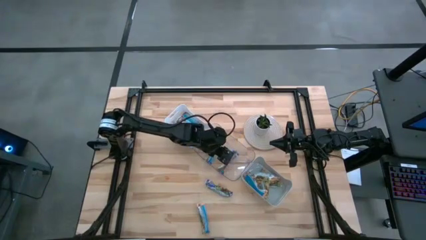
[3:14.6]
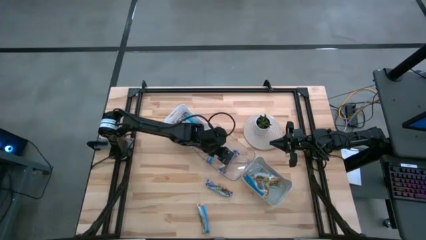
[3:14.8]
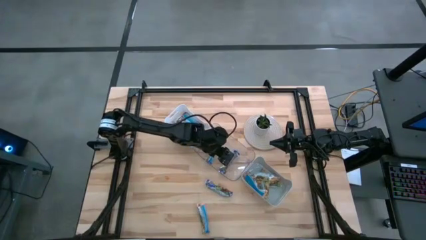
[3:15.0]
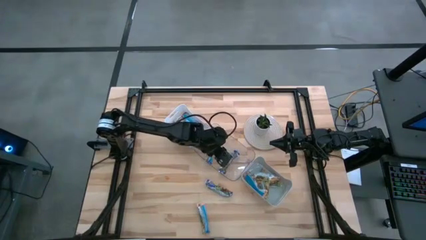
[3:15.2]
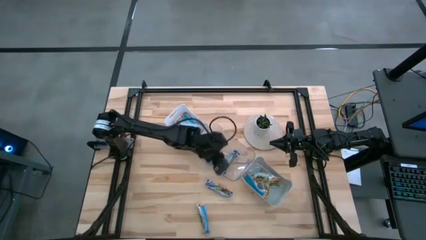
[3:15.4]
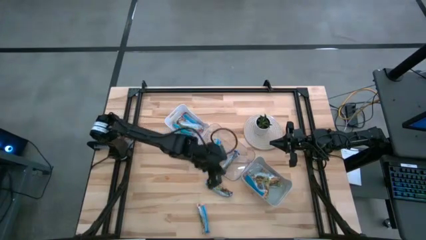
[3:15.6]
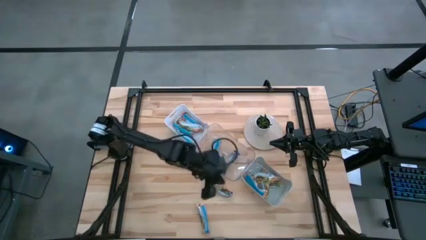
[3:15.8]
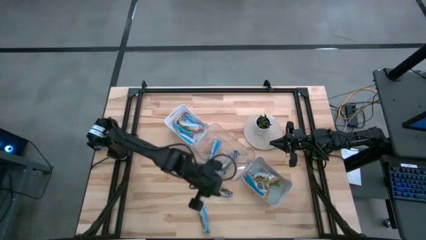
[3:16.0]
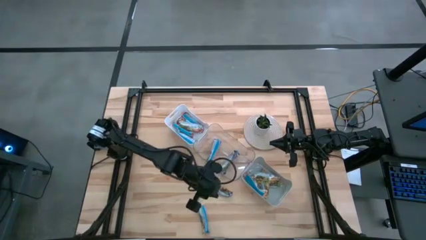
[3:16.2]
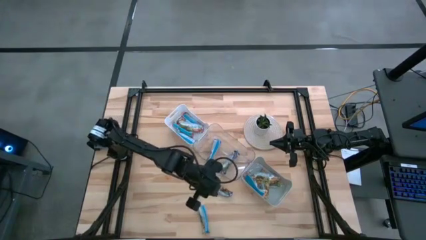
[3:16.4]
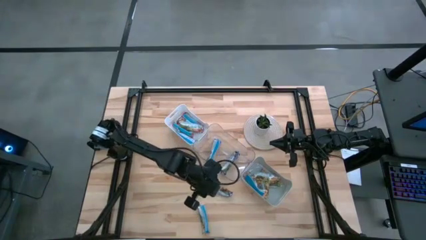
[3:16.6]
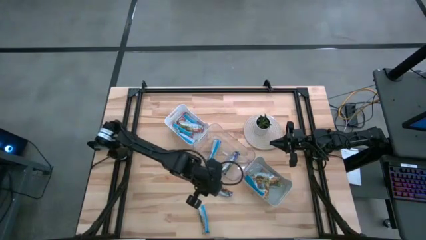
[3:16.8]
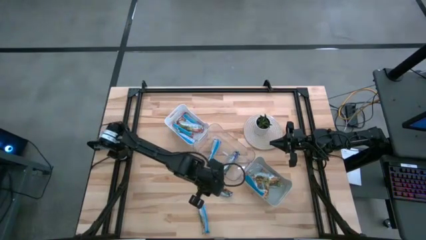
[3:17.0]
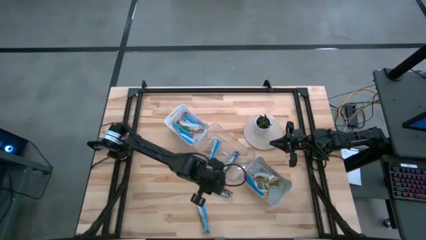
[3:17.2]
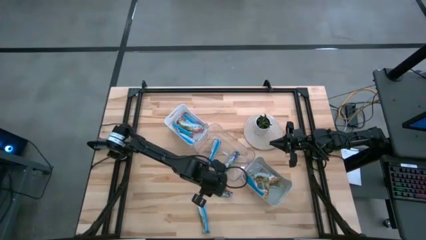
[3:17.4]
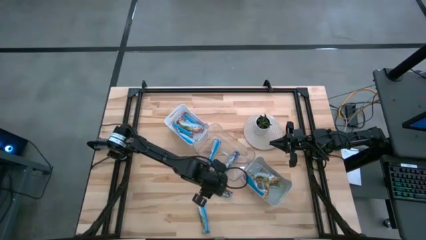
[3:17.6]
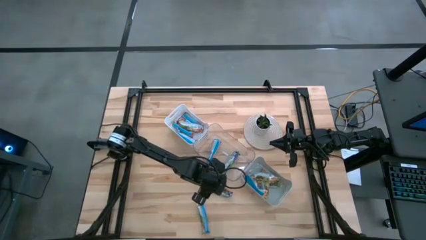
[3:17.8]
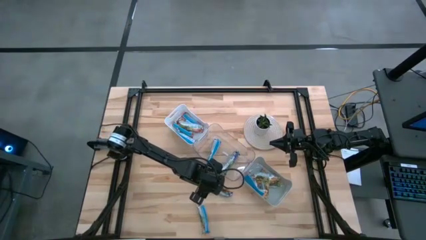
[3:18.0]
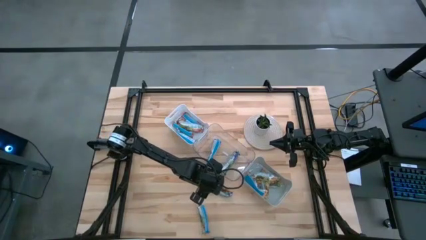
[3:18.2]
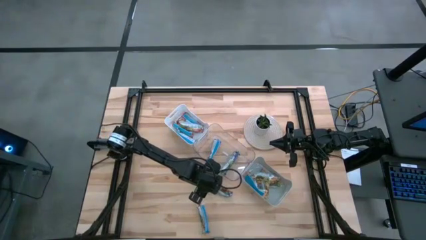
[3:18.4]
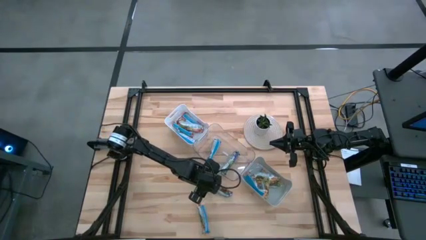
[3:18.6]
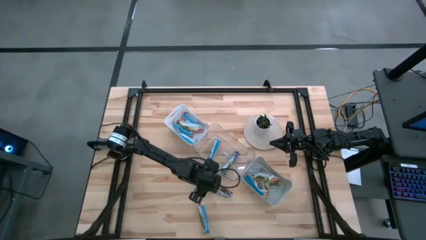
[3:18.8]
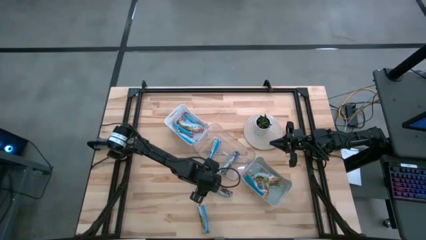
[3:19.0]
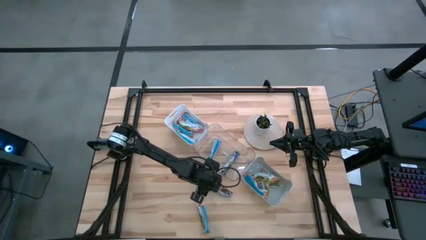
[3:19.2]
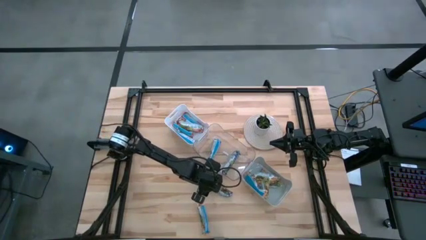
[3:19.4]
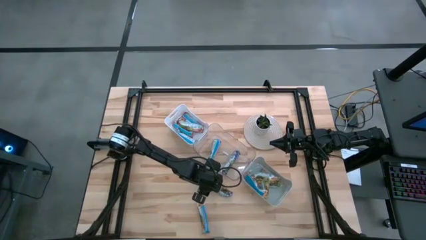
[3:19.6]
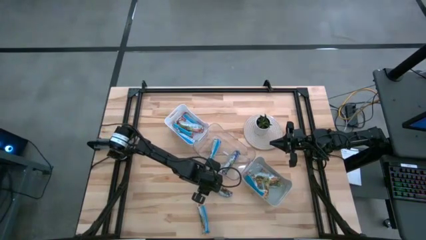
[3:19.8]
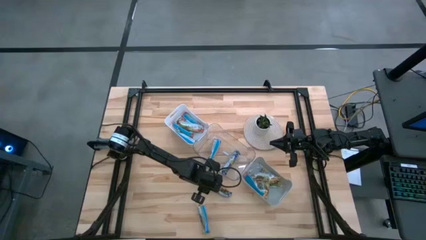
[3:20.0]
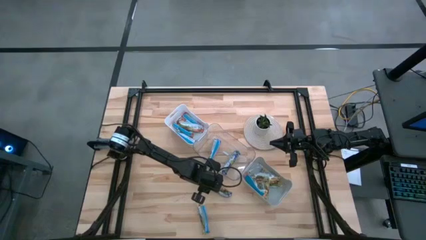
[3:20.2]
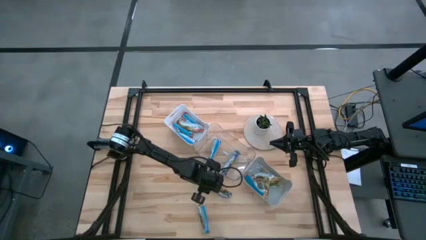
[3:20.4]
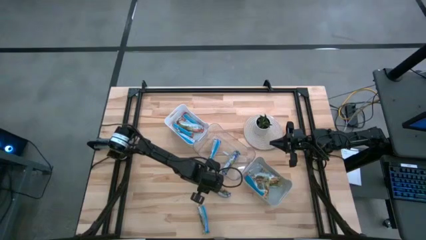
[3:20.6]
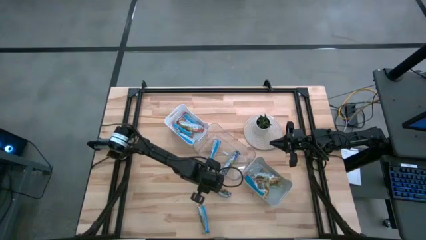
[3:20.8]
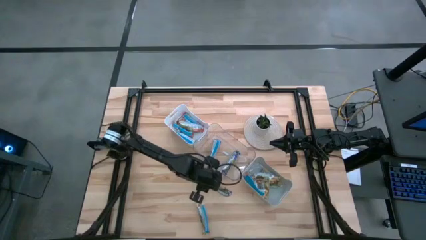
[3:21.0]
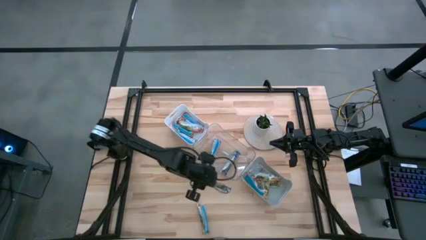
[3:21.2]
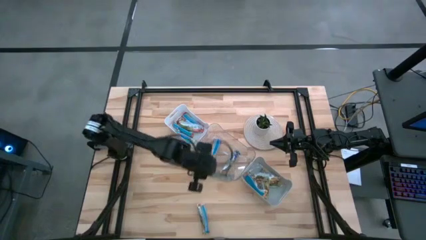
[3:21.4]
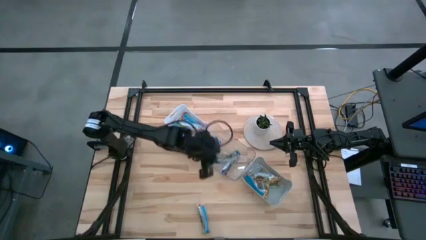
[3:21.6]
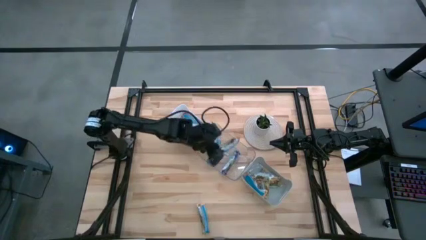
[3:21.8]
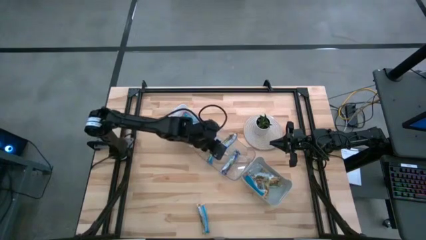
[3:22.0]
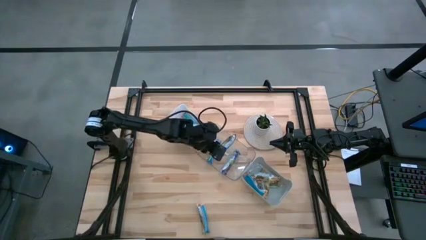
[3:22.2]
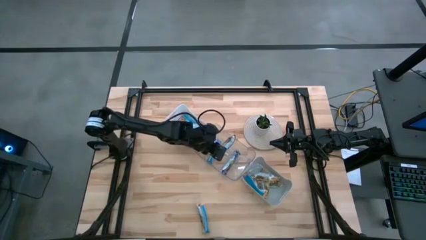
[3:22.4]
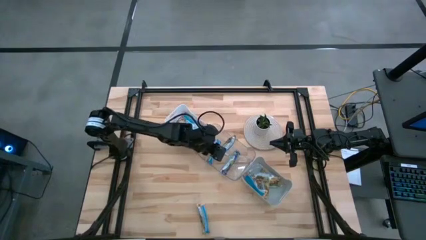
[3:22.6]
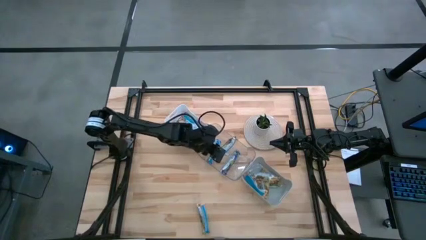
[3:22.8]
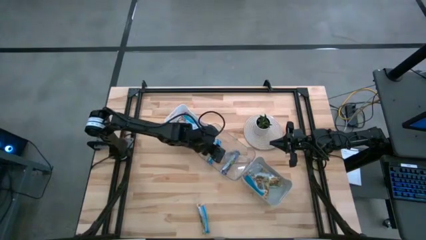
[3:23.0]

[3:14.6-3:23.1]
Task: Pick and place Granola Bars by type
Put the blue granola bar into the transparent bin

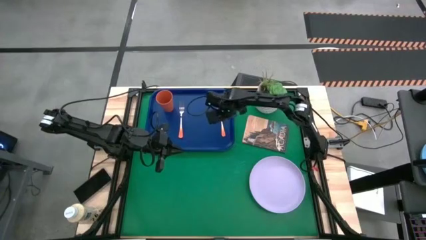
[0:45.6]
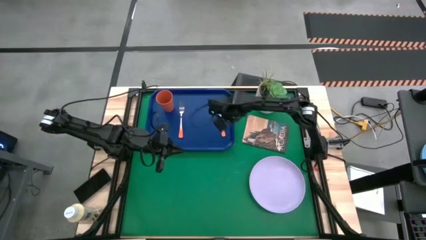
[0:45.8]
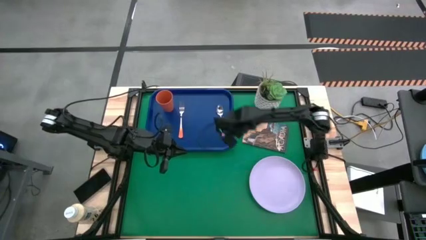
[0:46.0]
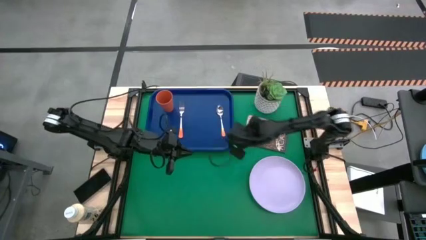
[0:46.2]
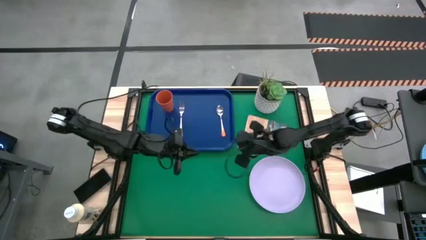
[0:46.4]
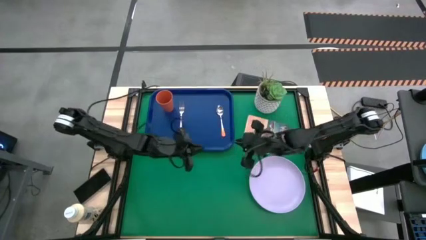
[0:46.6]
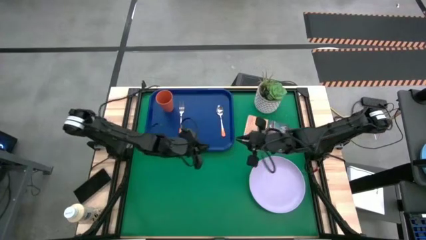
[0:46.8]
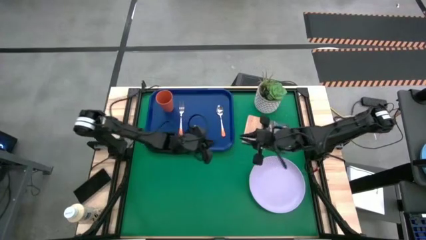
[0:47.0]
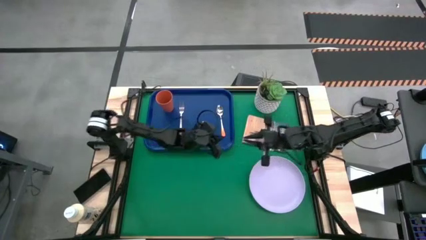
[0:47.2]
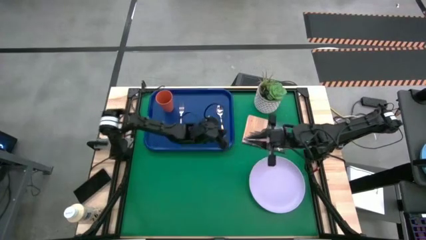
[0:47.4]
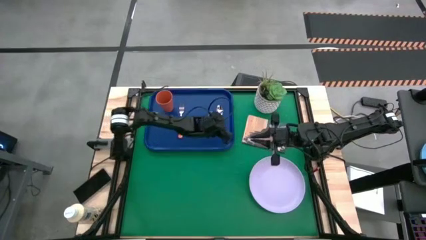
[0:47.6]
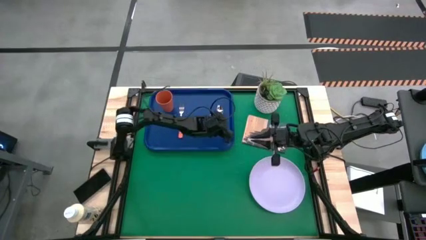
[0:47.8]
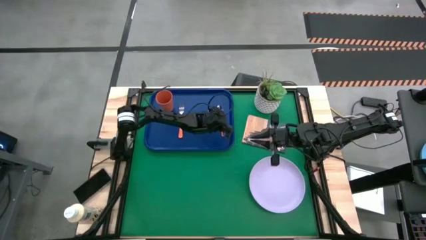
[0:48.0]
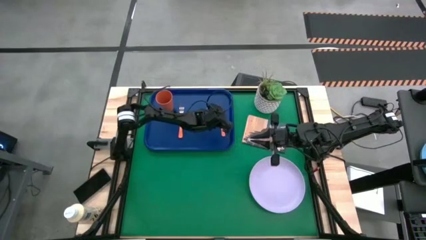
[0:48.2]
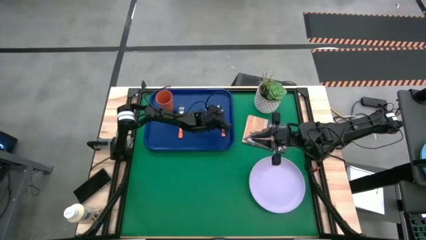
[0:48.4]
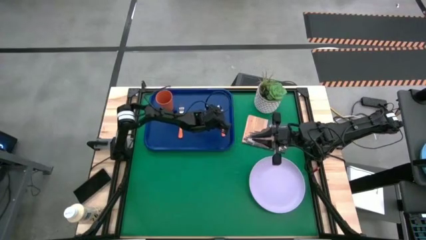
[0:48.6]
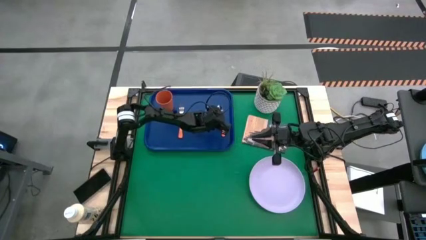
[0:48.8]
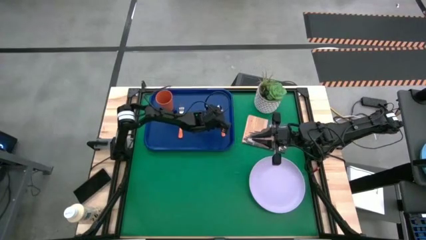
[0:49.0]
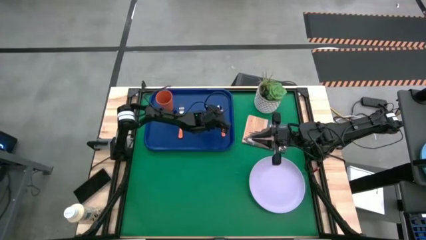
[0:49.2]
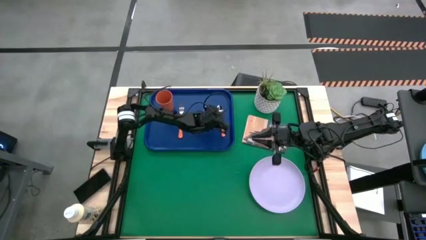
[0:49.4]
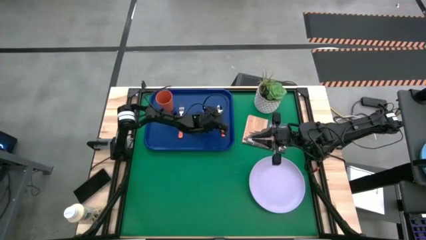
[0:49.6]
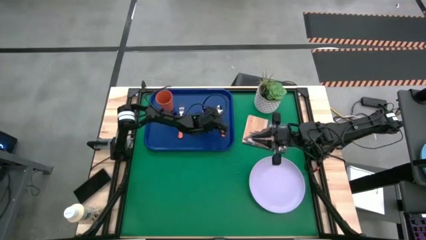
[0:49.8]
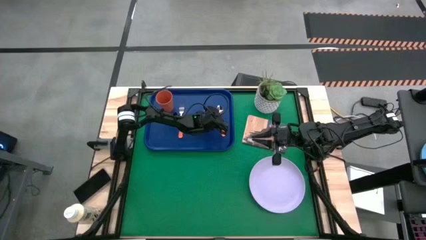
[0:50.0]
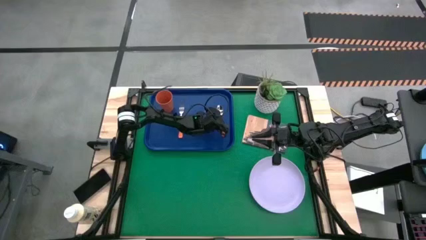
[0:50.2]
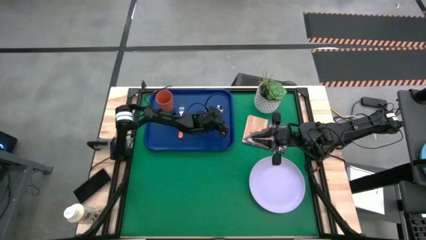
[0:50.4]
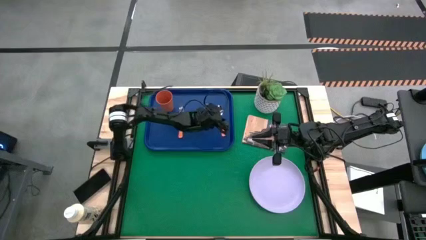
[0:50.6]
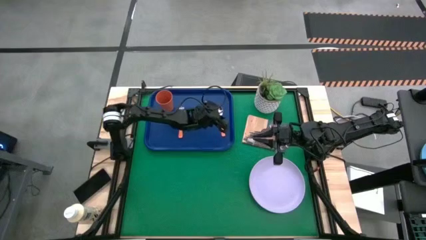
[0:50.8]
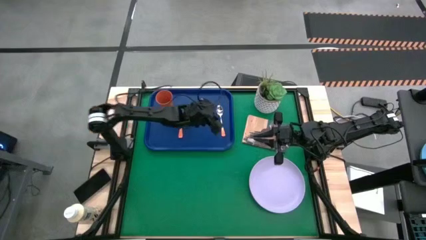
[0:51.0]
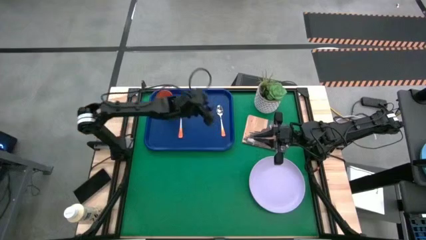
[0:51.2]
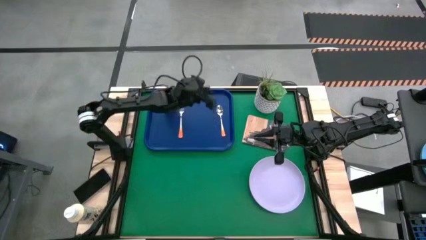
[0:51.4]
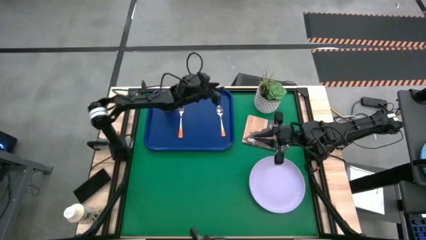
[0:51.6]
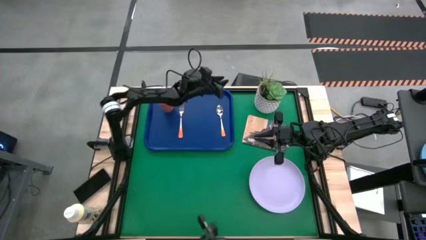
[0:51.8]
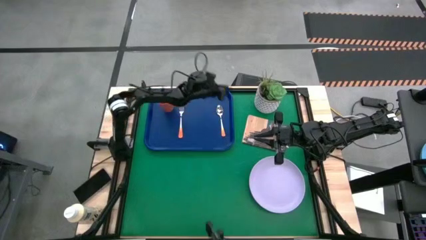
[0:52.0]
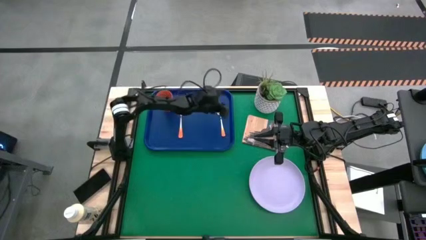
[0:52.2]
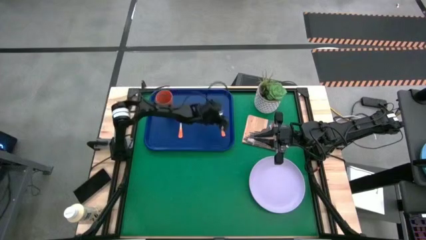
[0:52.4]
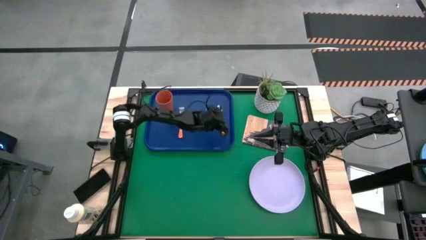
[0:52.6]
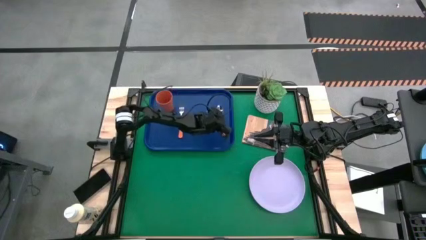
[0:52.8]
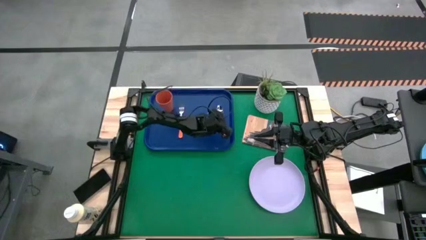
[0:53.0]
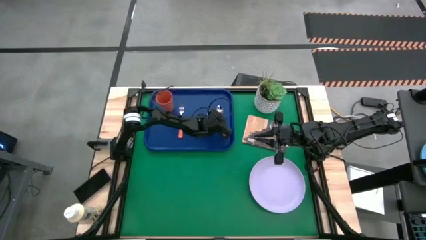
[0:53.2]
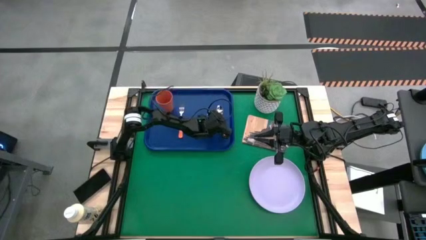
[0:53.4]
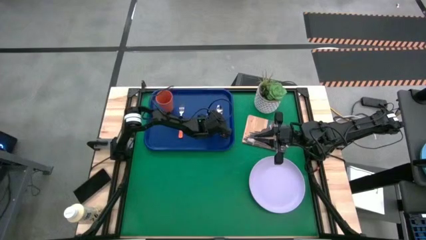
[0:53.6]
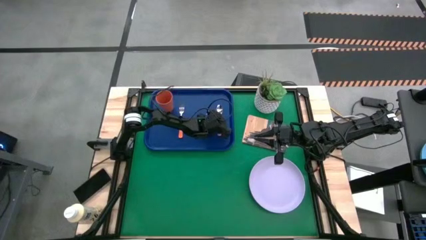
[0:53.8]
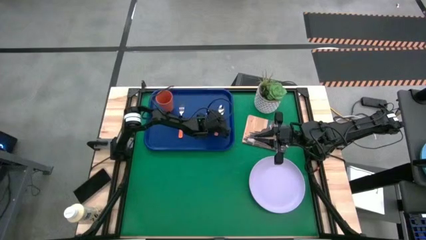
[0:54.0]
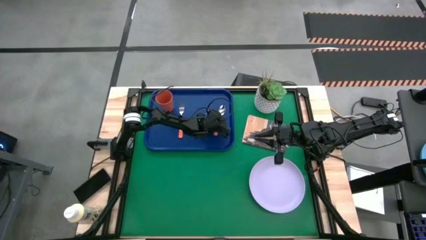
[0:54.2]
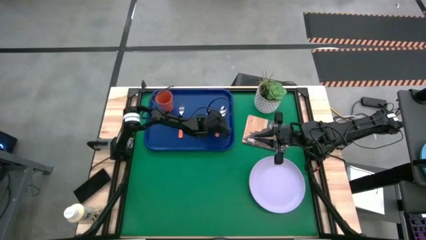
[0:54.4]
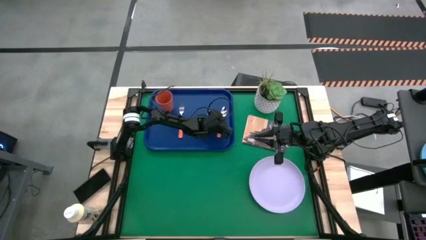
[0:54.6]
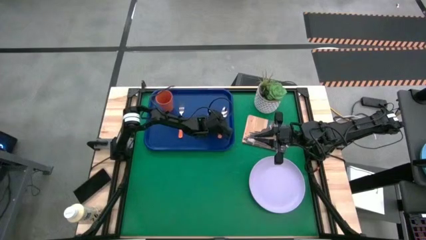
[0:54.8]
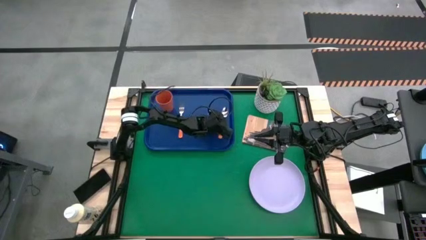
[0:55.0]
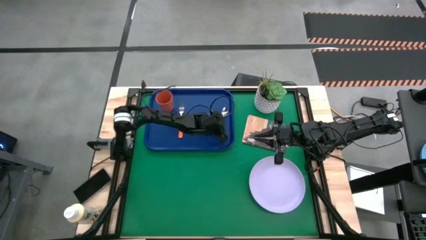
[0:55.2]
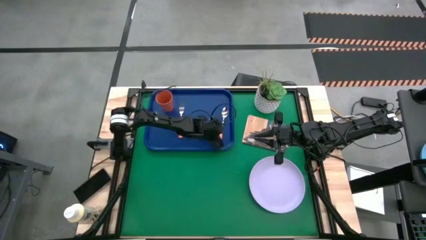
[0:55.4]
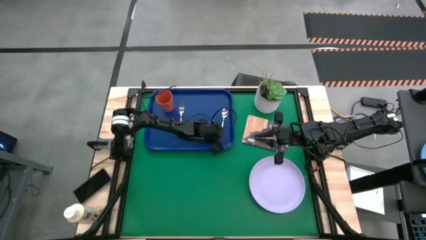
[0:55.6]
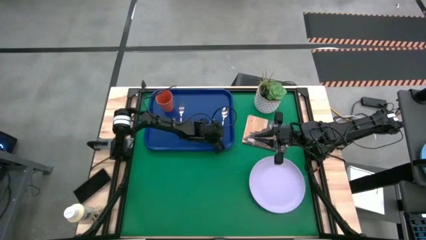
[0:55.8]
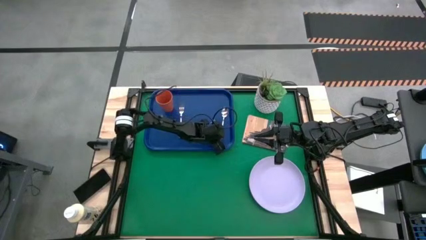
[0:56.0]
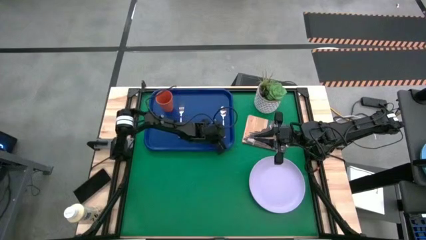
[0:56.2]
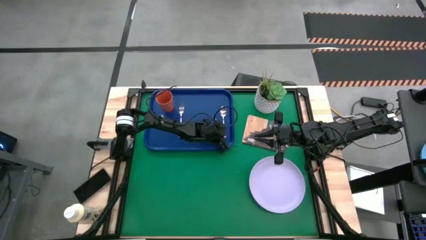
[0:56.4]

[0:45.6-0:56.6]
Task: Pick and place plate/cup/fork/spoon on tray
Put the orange spoon on the blue tray to the right side of the orange fork
